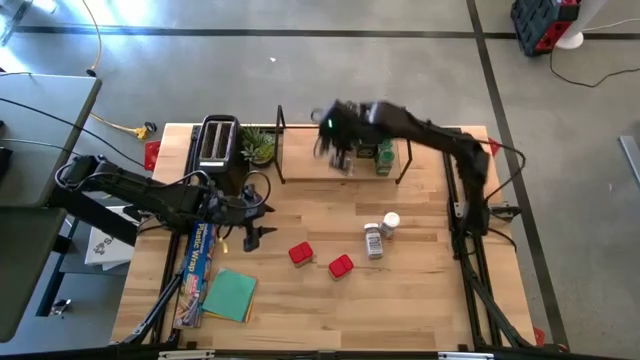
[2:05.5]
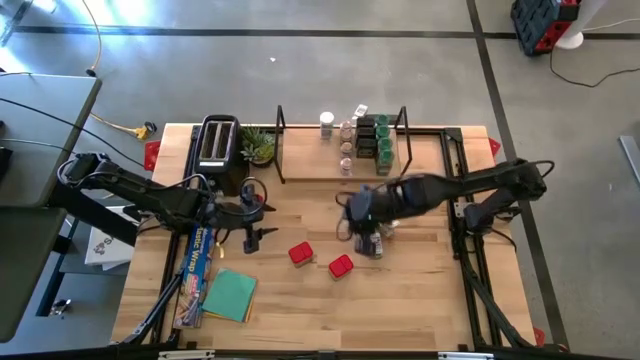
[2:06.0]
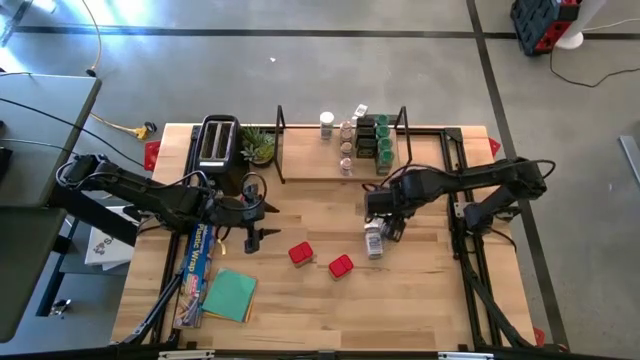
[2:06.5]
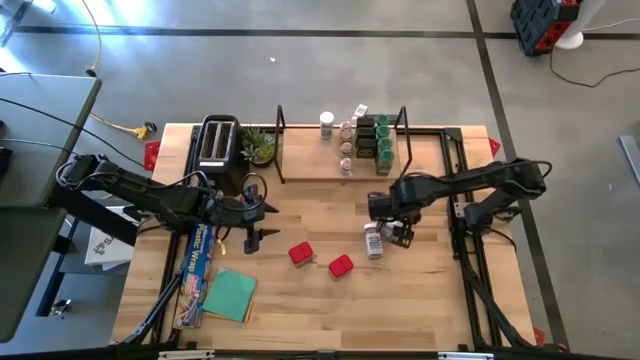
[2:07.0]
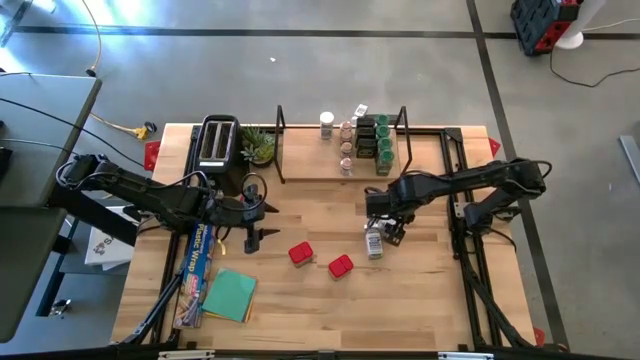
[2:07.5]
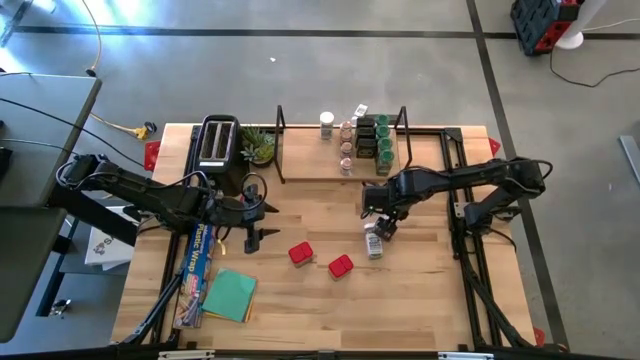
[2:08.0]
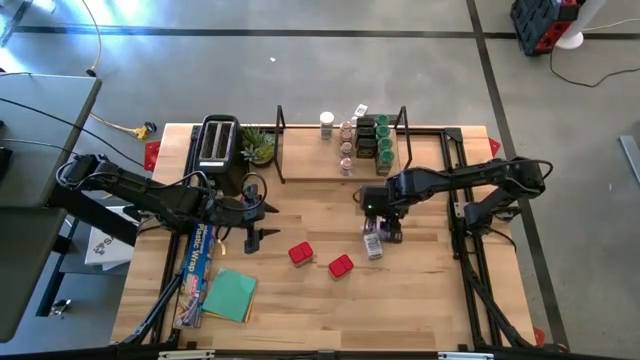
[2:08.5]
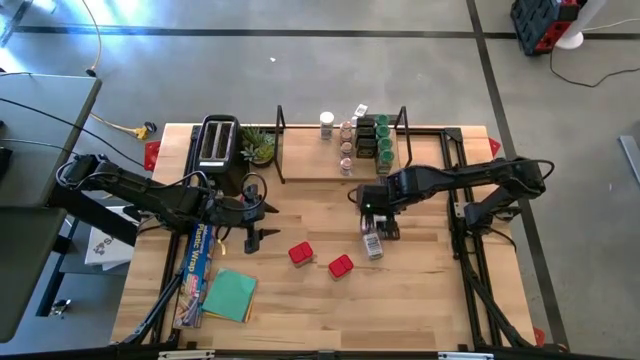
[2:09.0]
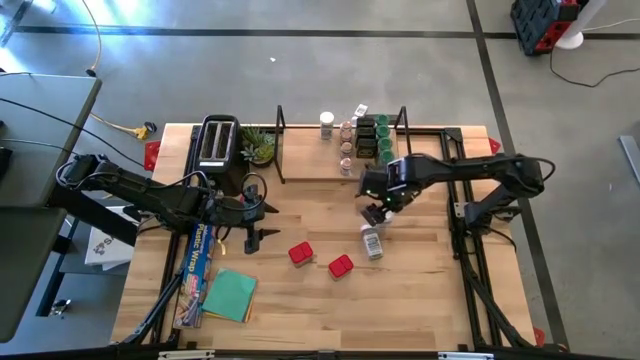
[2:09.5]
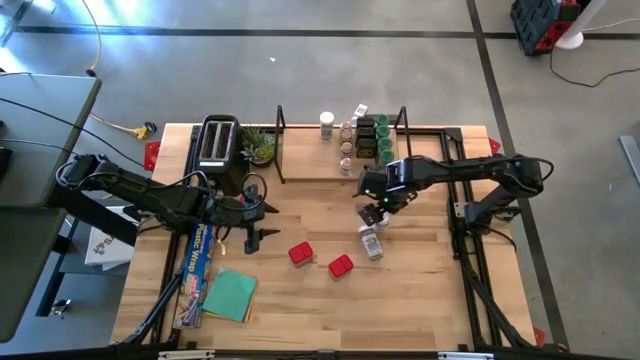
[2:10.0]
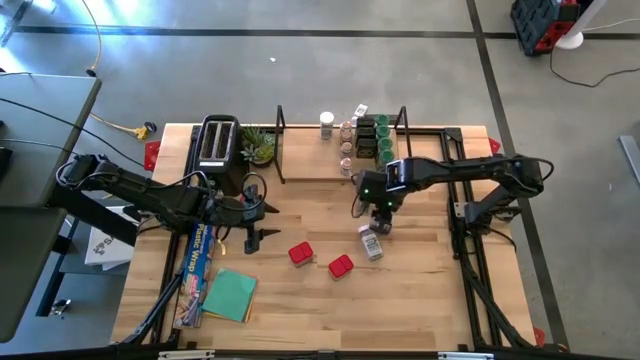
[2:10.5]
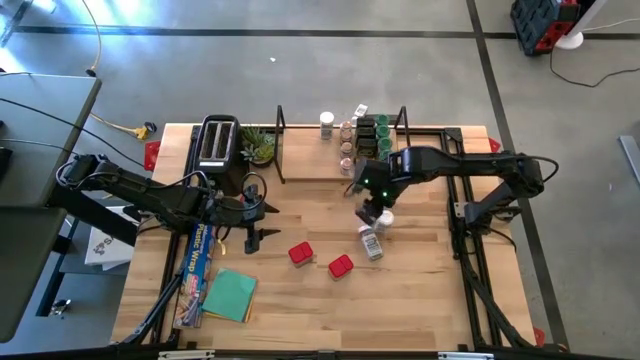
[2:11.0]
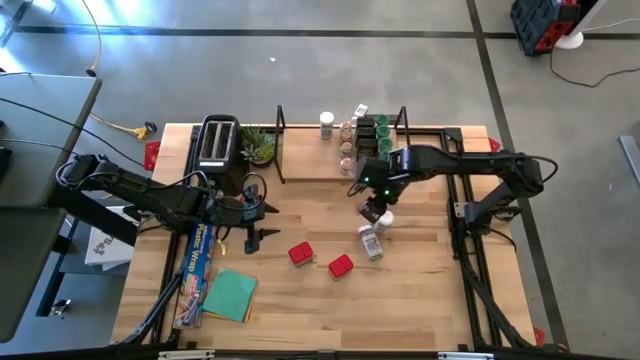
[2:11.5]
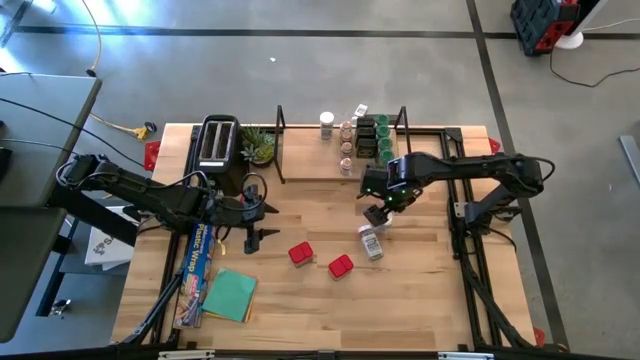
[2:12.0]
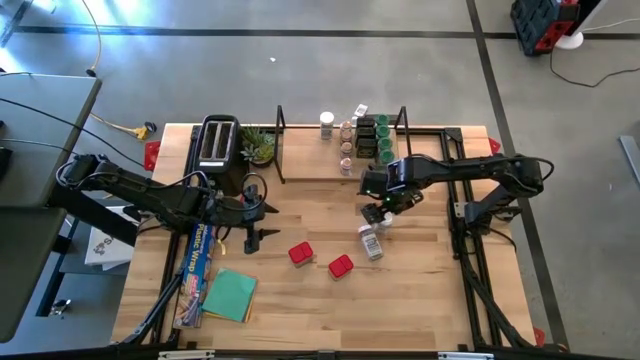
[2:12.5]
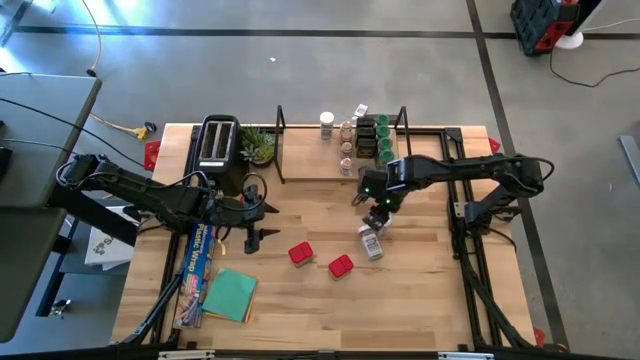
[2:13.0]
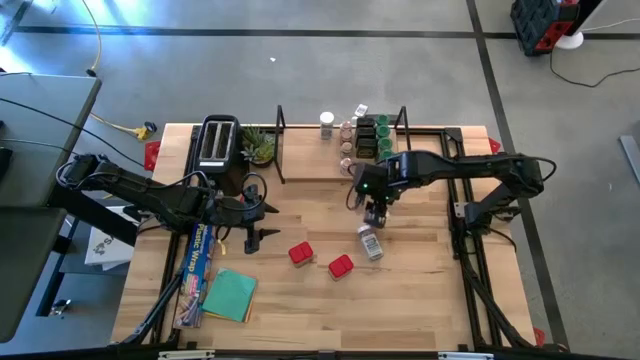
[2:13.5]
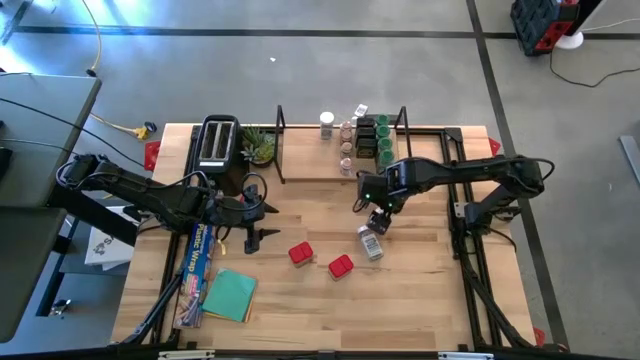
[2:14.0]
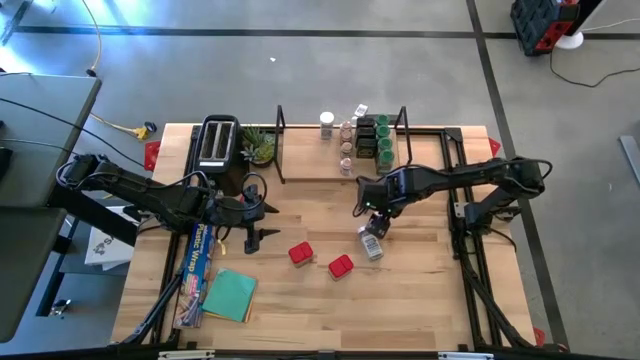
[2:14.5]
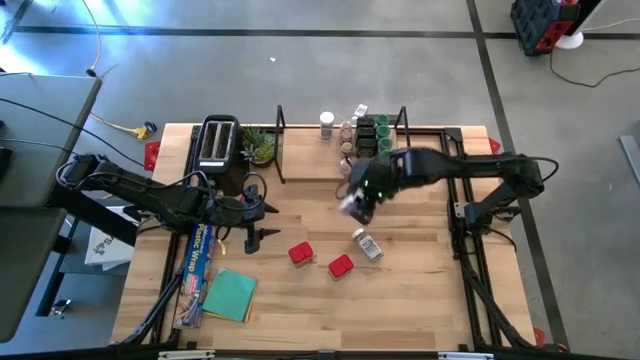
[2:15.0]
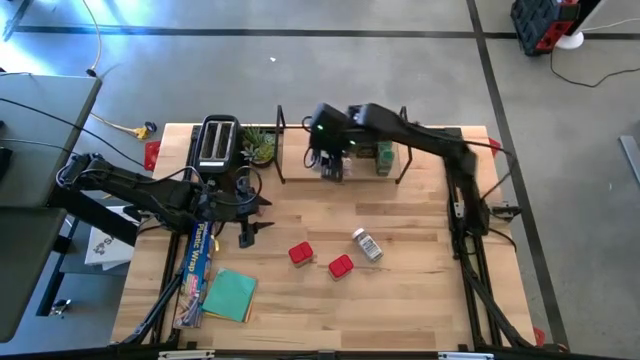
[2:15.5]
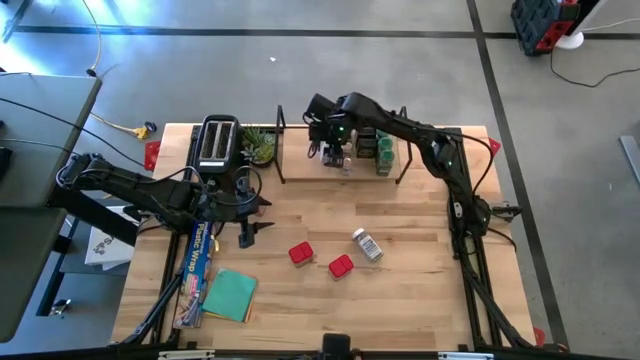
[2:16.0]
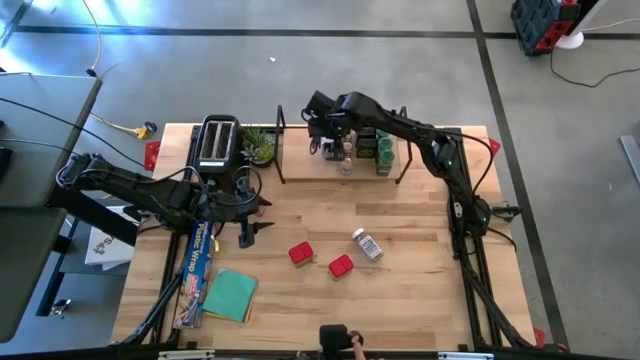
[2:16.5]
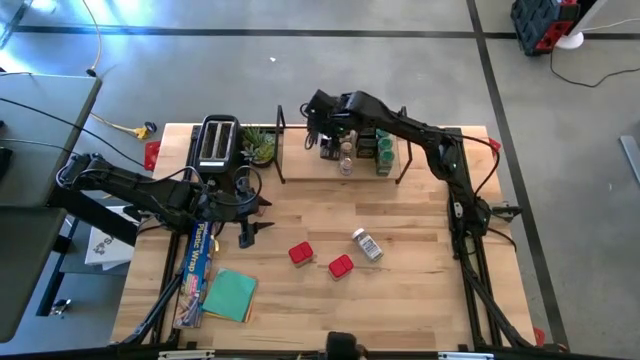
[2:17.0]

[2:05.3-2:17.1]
Task: Shelf spices
Put the top white seasoning bottle on the shelf aligned with the other white seasoning bottle

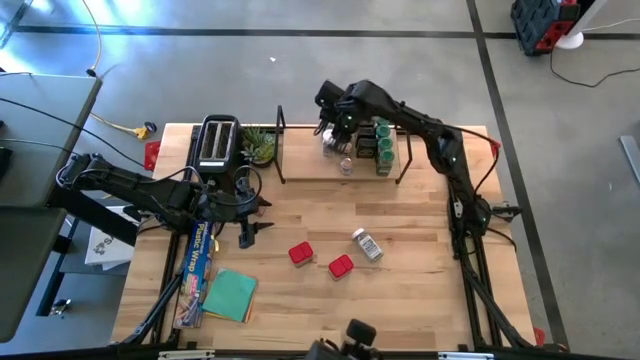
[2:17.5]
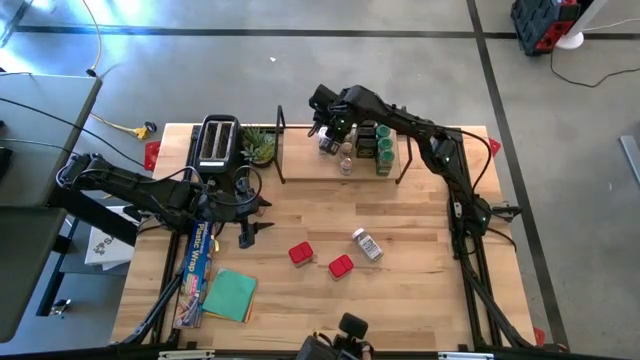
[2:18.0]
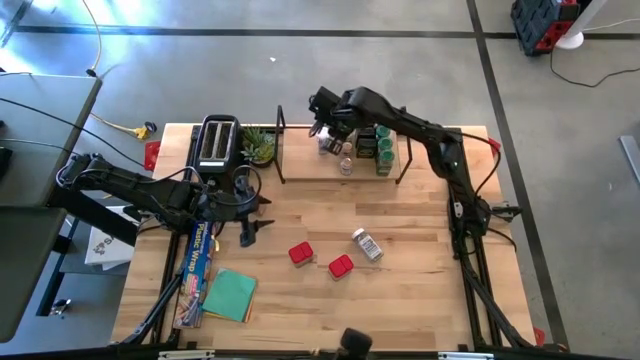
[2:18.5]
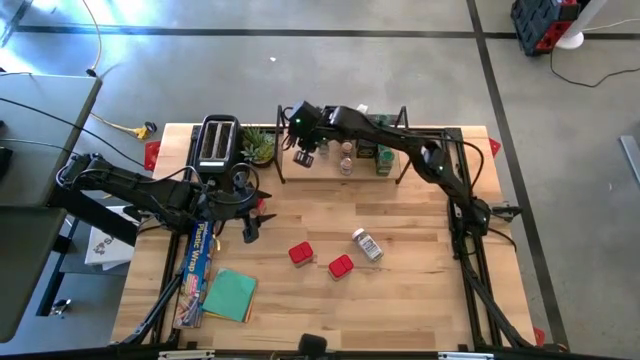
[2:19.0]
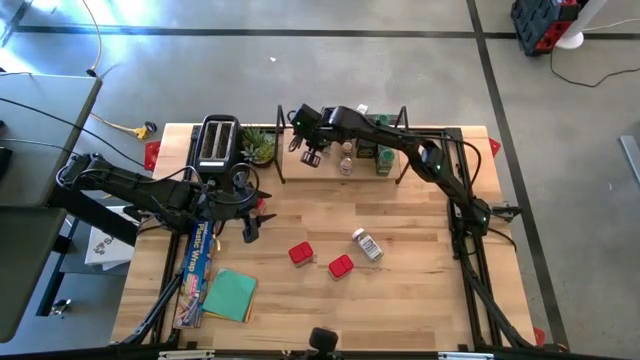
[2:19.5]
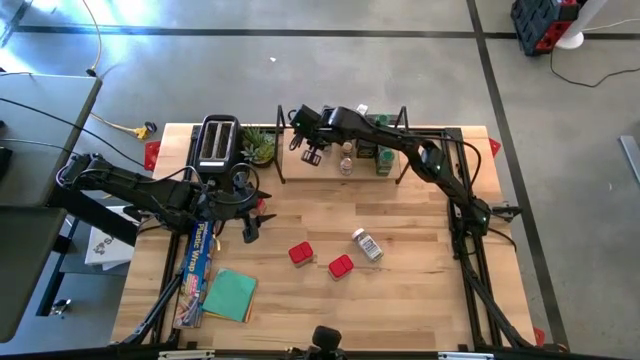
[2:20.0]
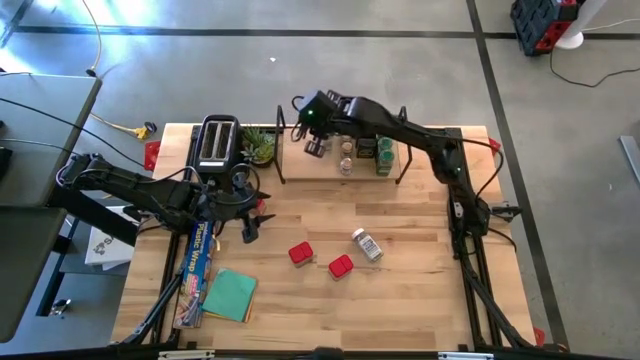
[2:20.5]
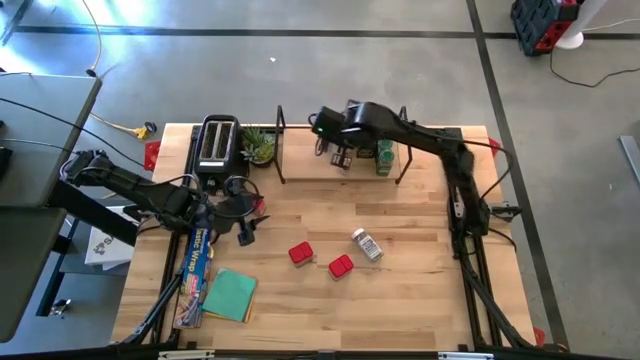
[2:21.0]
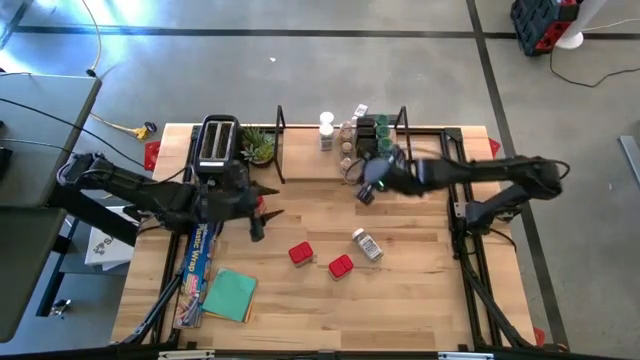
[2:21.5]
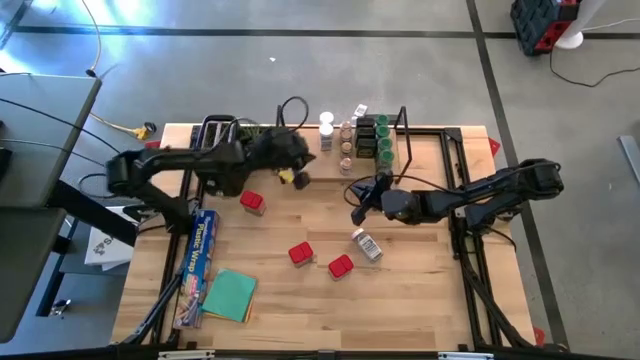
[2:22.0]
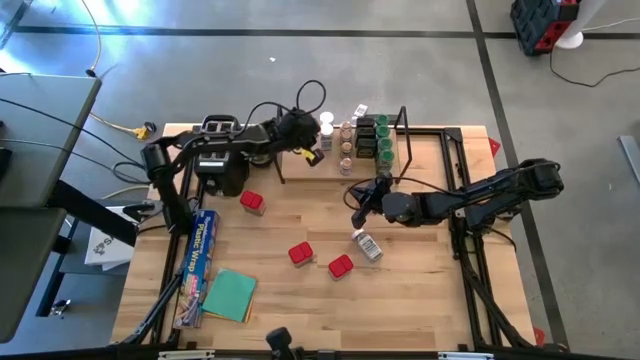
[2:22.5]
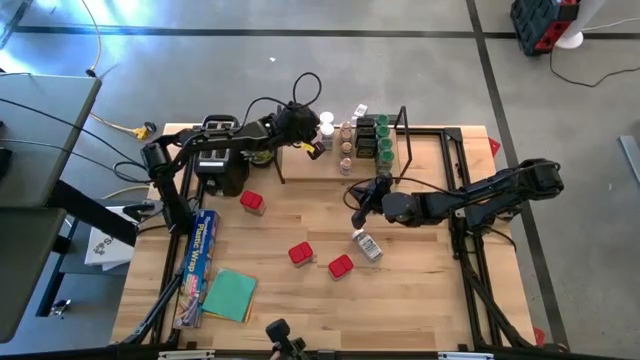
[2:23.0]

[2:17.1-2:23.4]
Adjust the white seasoning bottle

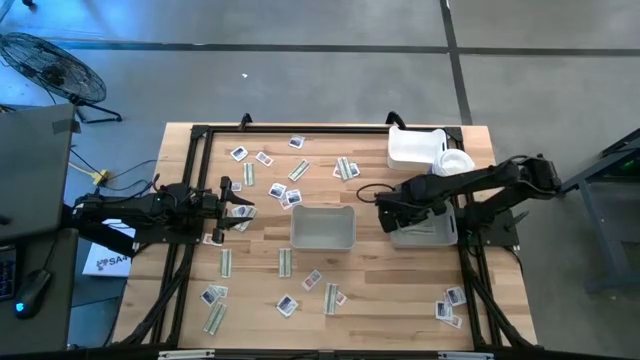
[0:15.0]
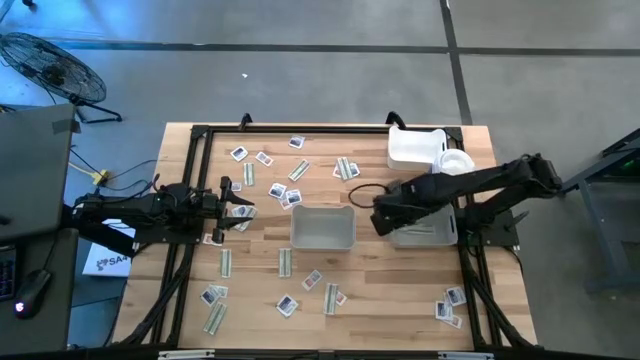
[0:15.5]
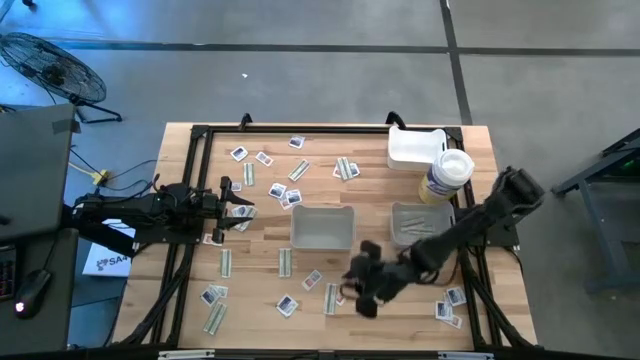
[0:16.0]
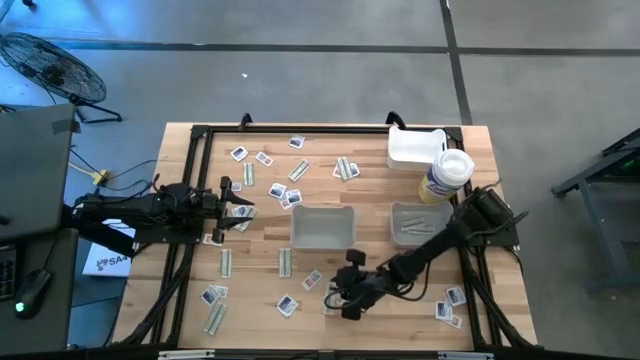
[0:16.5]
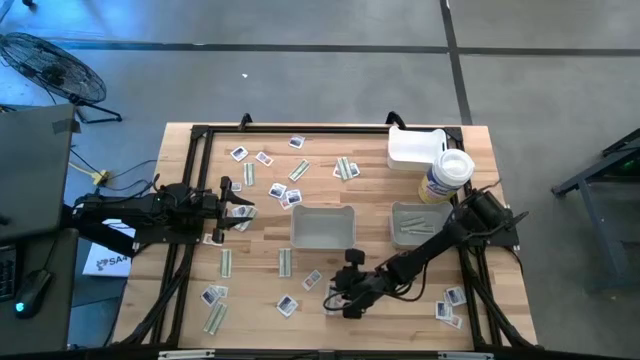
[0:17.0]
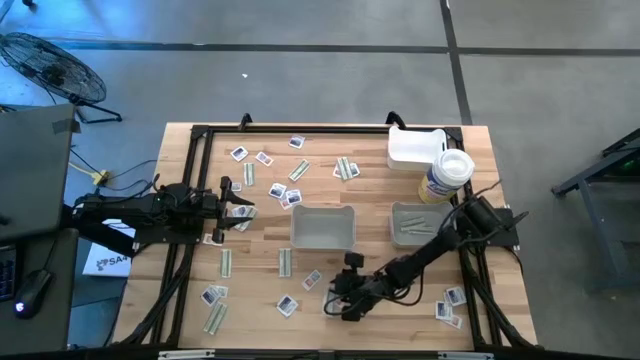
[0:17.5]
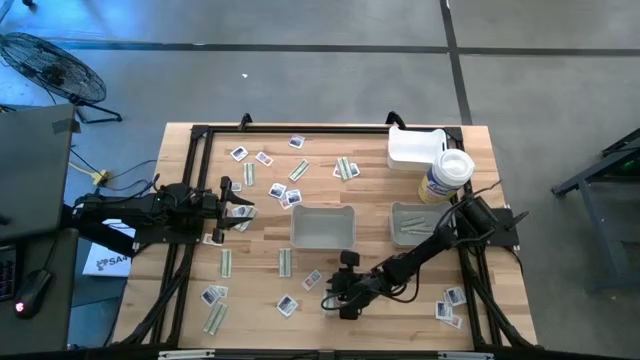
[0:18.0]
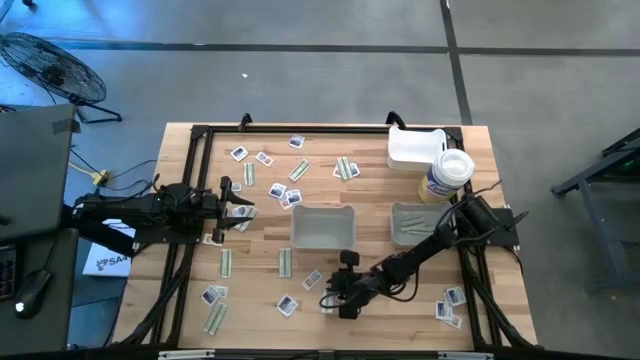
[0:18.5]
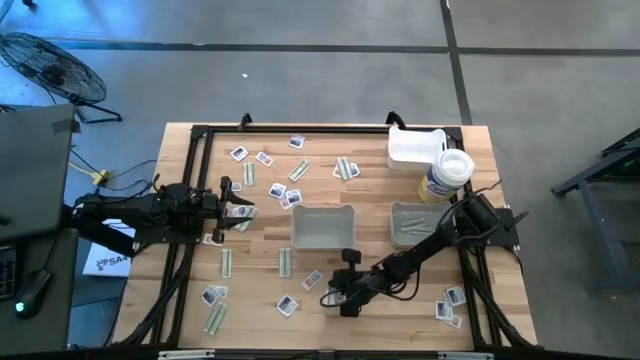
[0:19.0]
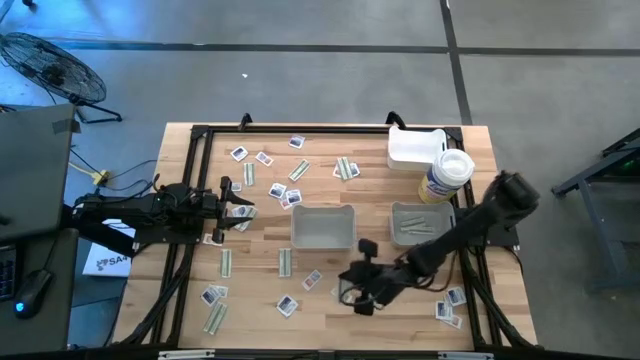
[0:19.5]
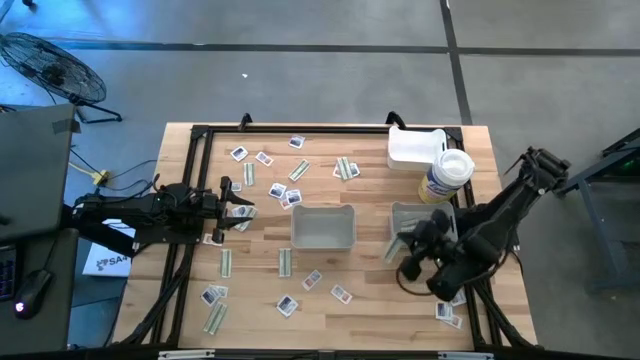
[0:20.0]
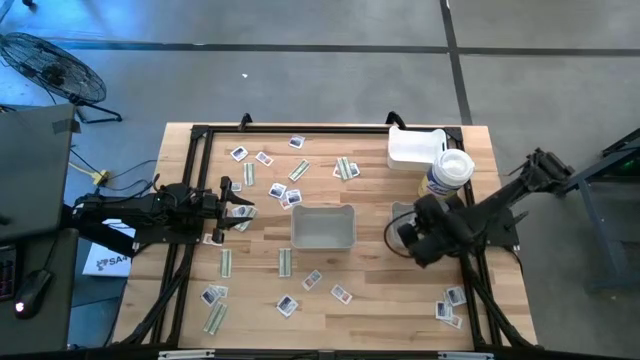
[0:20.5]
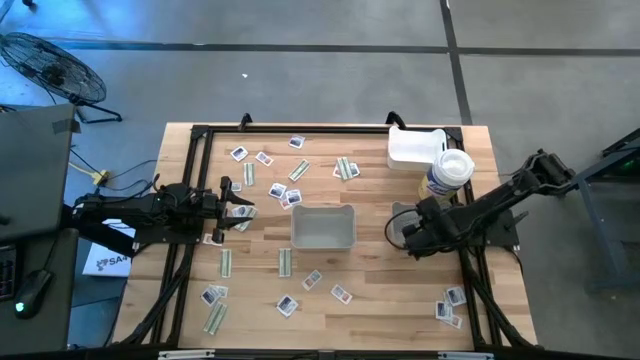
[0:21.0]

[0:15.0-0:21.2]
Task: Pick & Place First Aid Supplies
Put the green pad into the right gray bin
